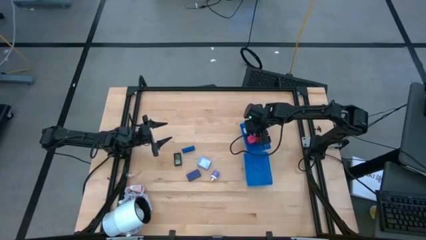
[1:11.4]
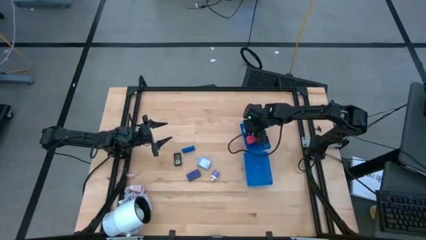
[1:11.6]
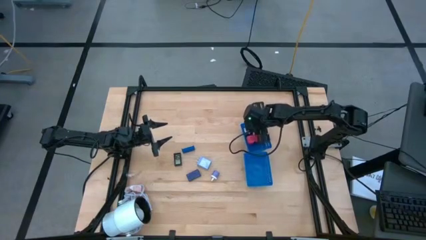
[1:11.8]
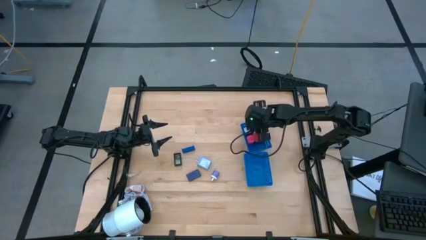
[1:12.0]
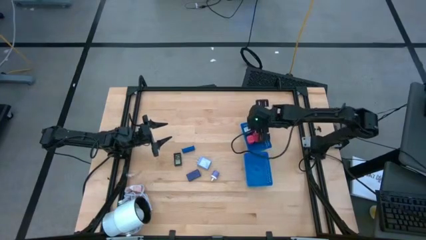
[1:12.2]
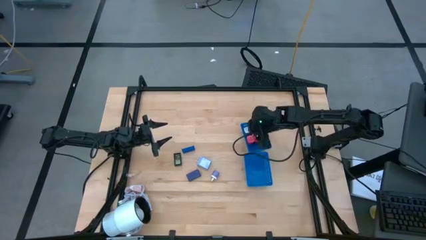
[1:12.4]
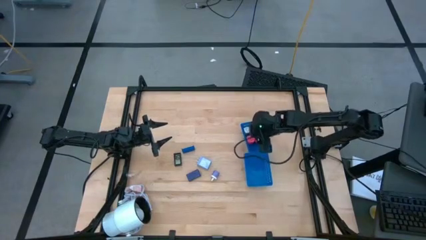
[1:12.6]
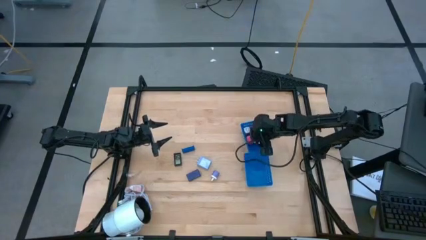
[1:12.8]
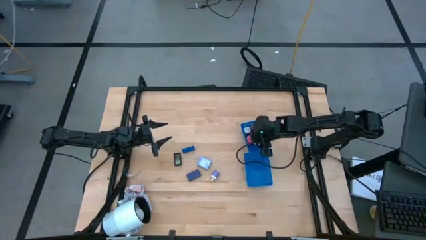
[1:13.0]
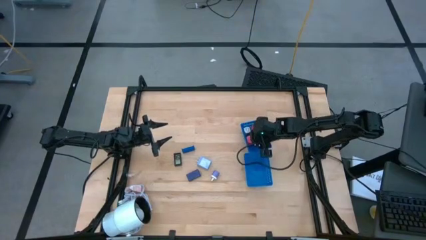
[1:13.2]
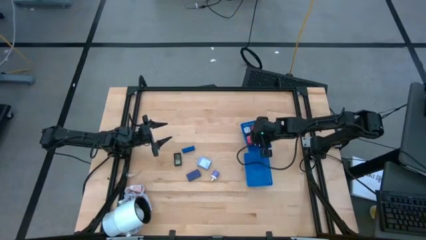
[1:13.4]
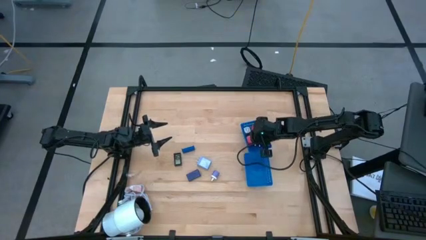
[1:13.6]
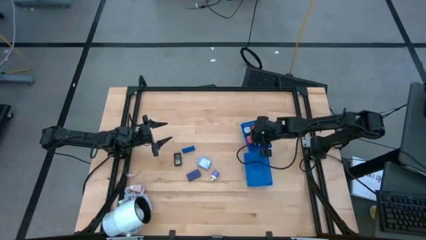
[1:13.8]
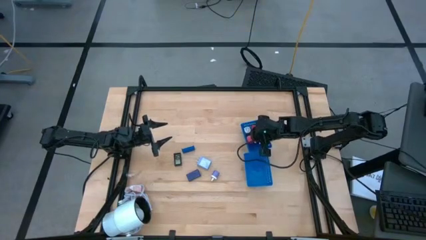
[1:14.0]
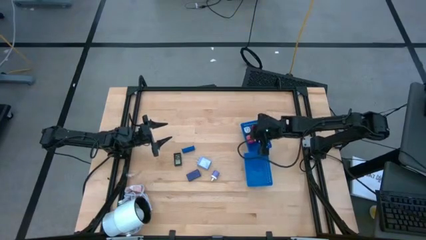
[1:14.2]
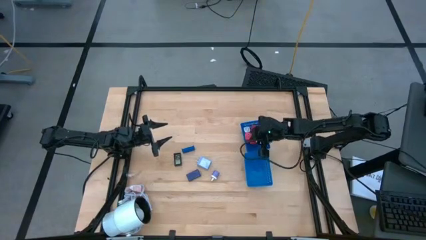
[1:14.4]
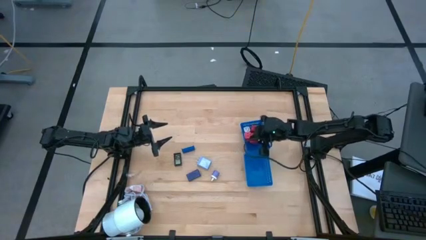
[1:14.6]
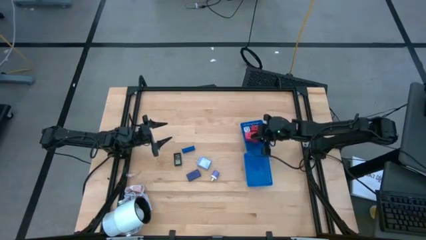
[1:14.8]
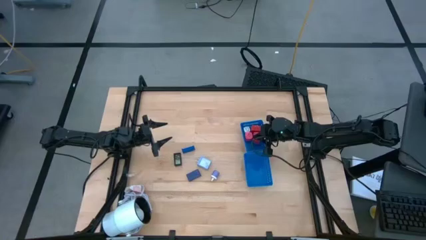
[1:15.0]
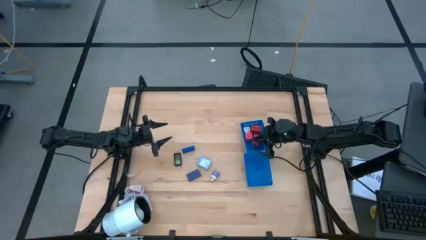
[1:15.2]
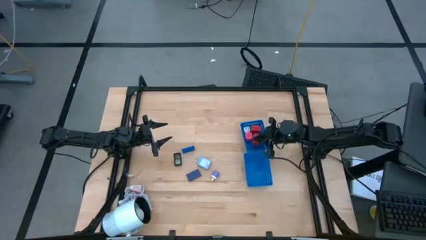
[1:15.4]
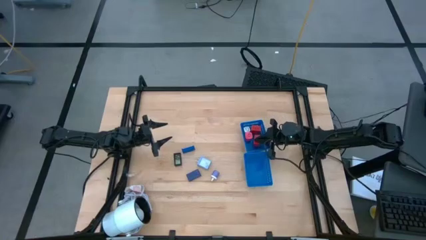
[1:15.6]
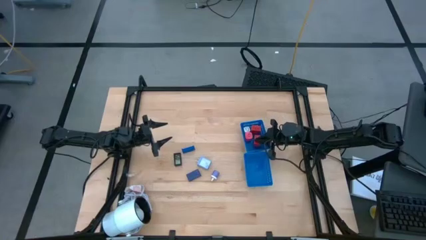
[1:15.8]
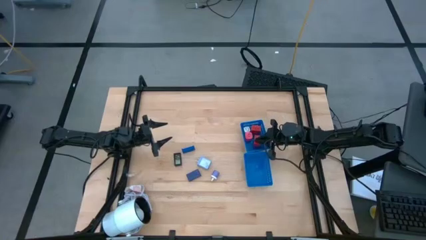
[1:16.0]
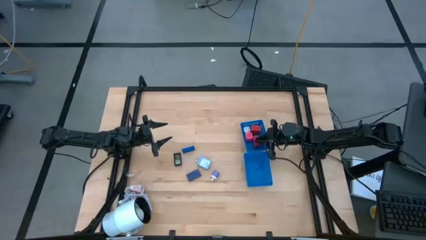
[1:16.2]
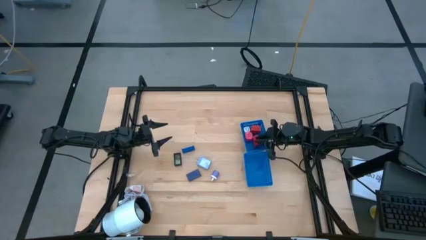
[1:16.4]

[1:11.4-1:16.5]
Task: Pick & Place Office items
Adjust the red charger adapter in the top blue bin

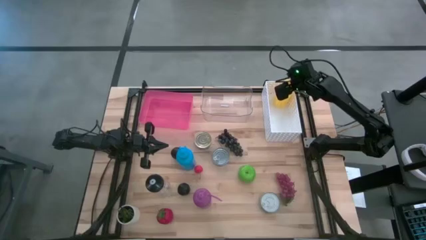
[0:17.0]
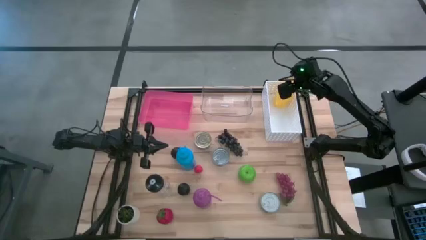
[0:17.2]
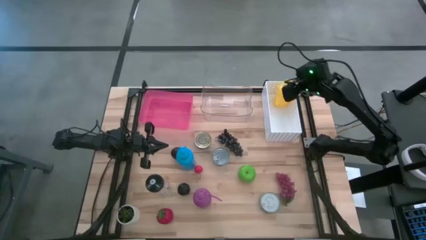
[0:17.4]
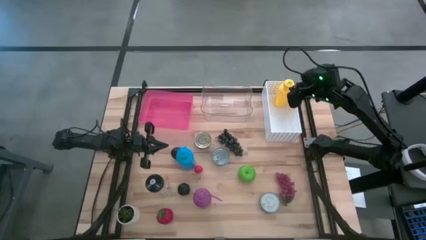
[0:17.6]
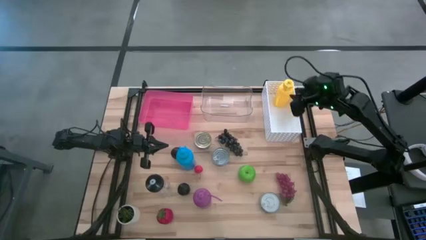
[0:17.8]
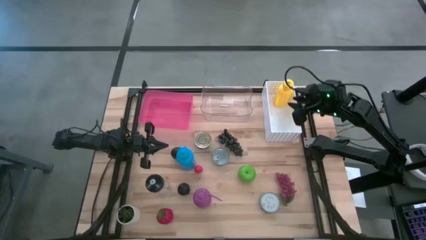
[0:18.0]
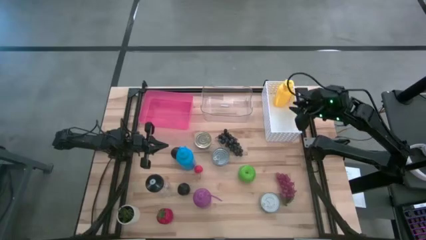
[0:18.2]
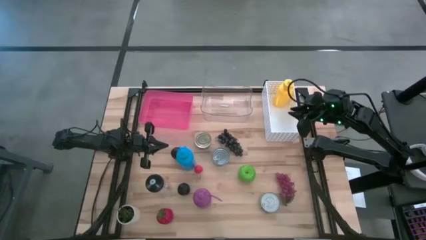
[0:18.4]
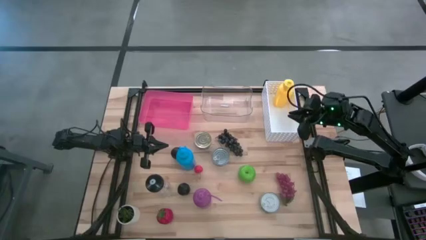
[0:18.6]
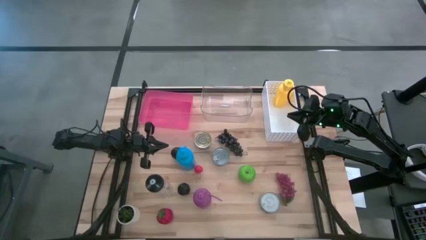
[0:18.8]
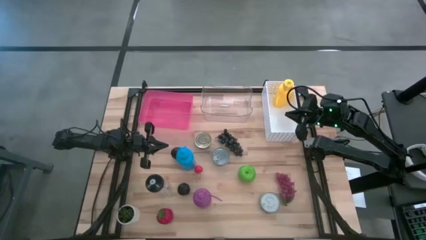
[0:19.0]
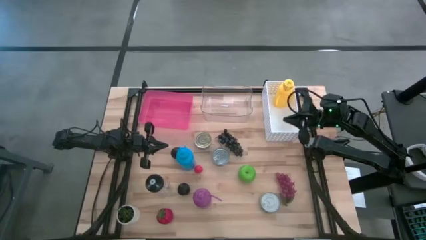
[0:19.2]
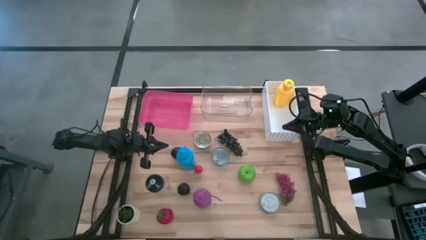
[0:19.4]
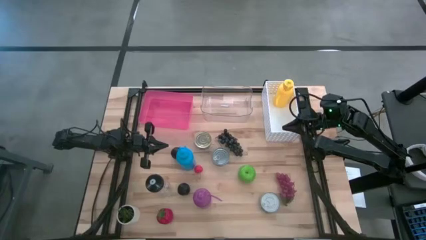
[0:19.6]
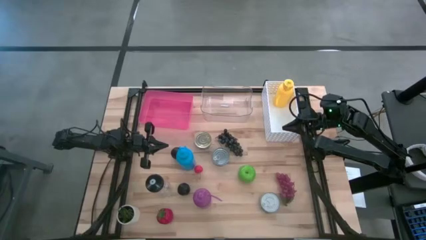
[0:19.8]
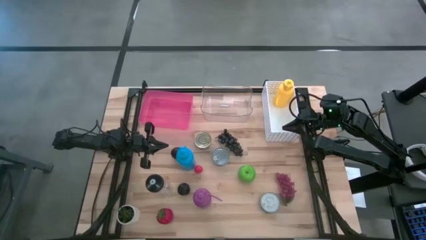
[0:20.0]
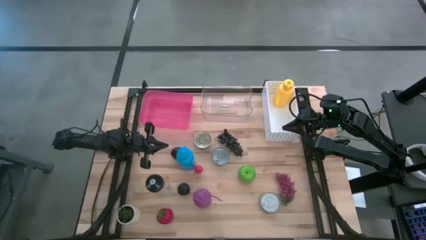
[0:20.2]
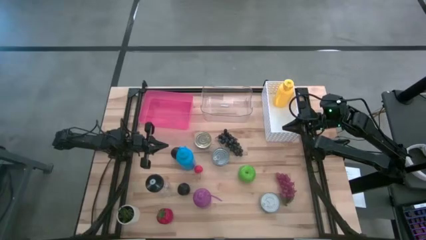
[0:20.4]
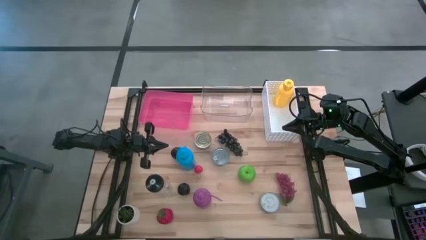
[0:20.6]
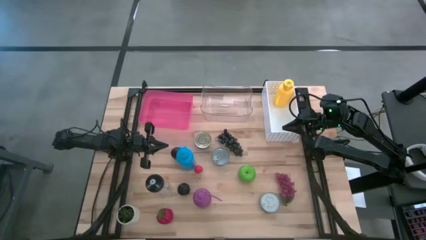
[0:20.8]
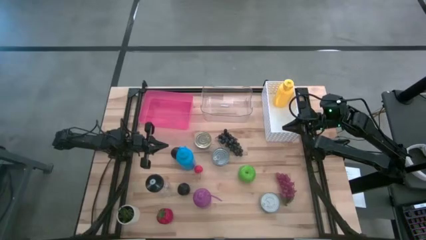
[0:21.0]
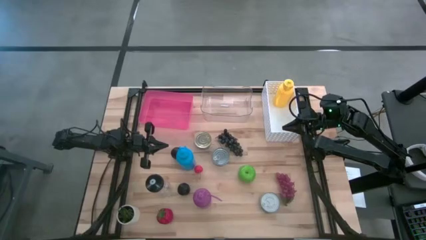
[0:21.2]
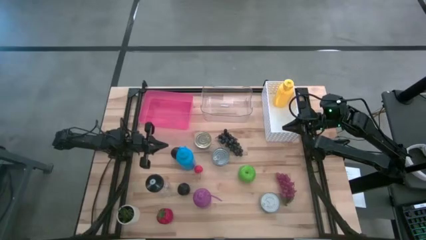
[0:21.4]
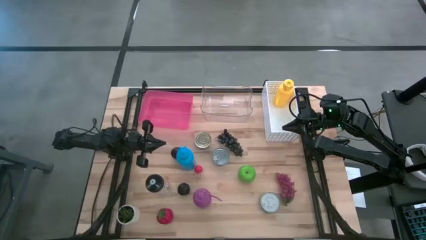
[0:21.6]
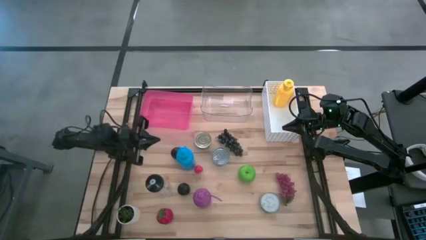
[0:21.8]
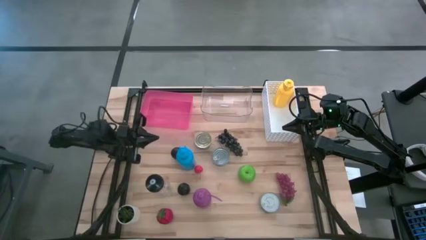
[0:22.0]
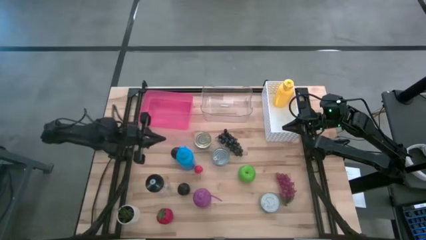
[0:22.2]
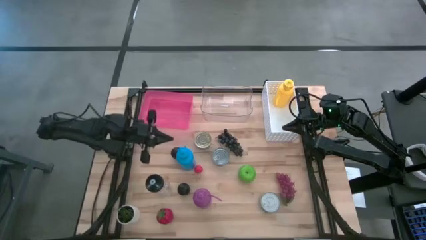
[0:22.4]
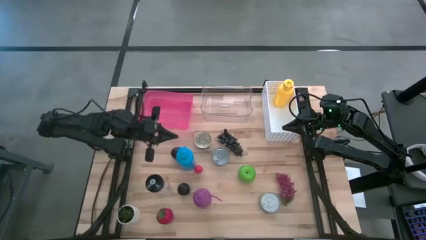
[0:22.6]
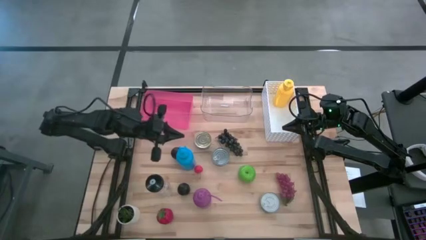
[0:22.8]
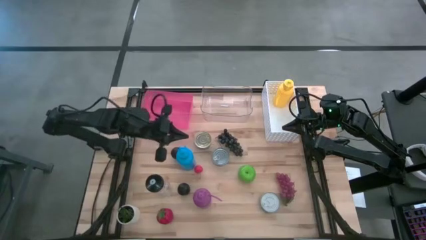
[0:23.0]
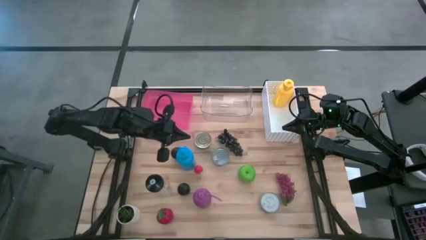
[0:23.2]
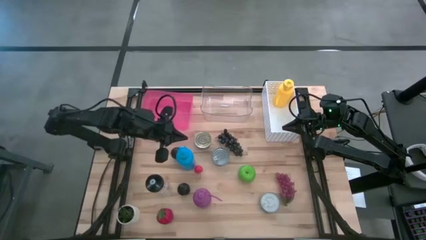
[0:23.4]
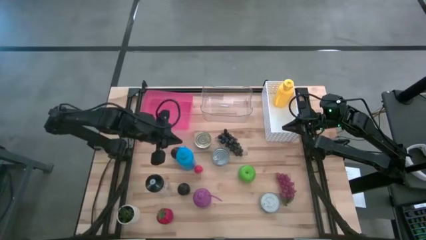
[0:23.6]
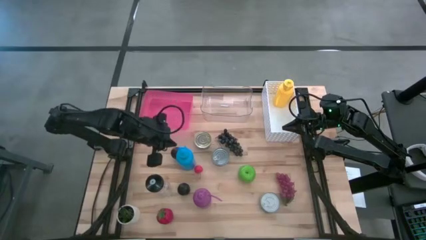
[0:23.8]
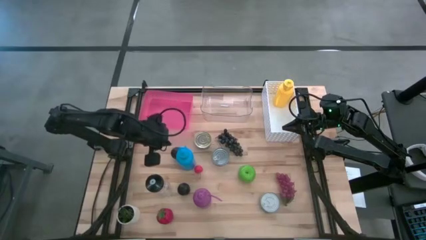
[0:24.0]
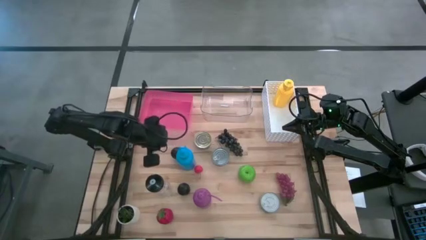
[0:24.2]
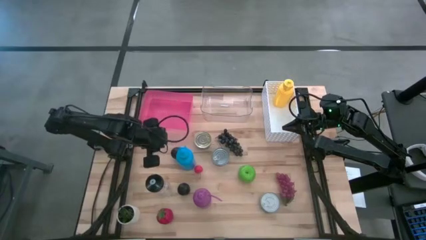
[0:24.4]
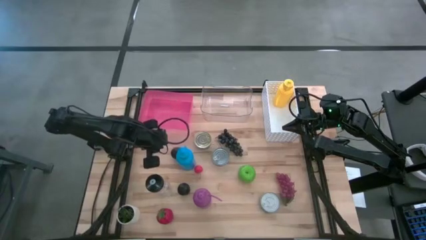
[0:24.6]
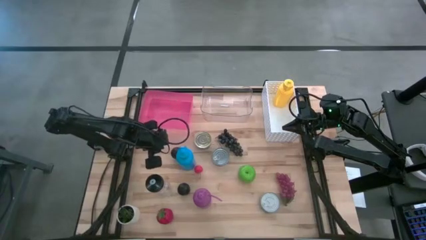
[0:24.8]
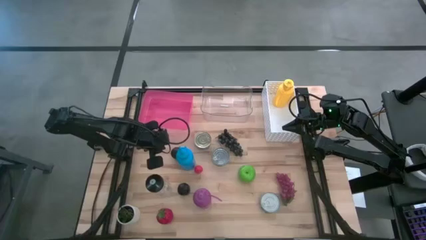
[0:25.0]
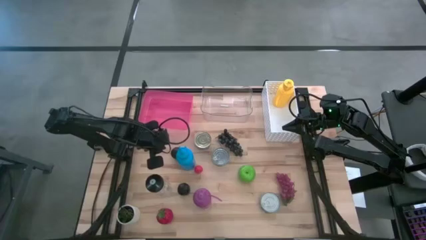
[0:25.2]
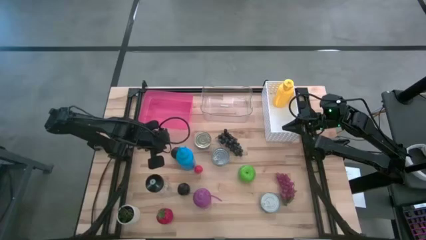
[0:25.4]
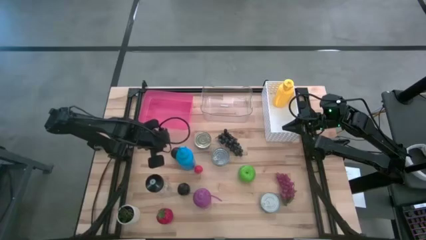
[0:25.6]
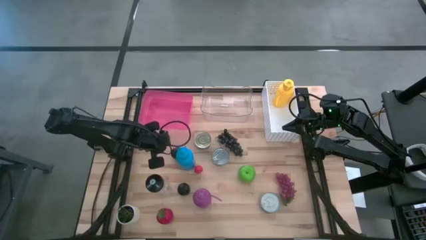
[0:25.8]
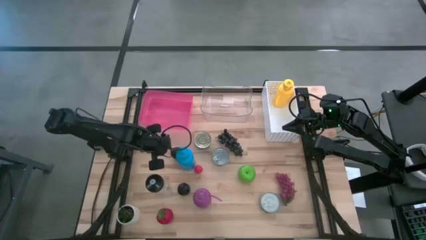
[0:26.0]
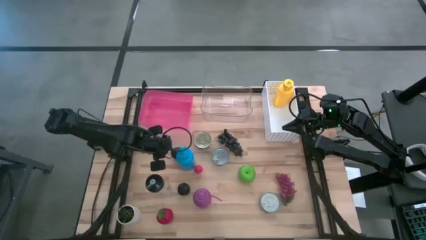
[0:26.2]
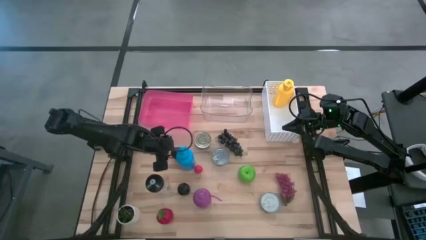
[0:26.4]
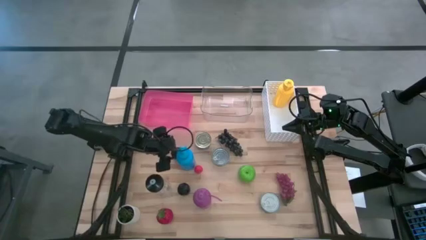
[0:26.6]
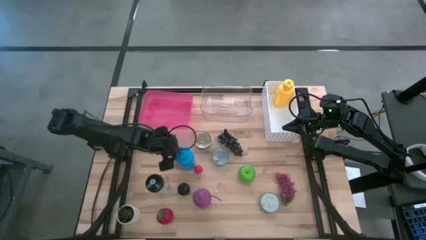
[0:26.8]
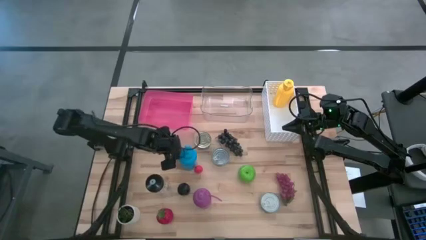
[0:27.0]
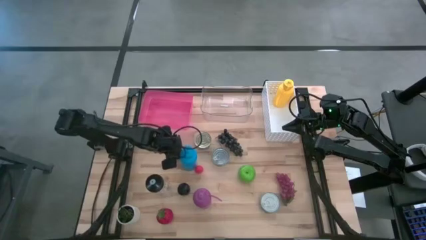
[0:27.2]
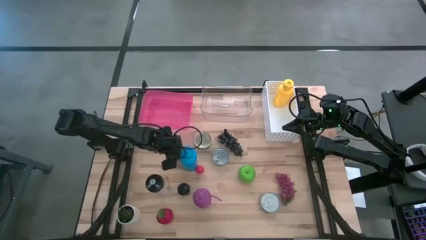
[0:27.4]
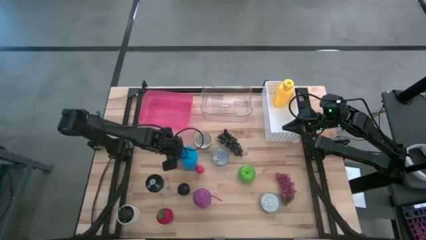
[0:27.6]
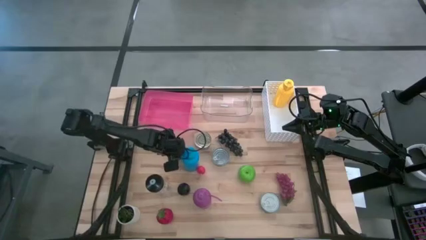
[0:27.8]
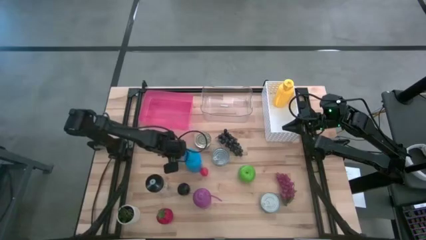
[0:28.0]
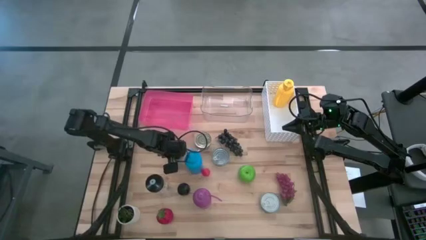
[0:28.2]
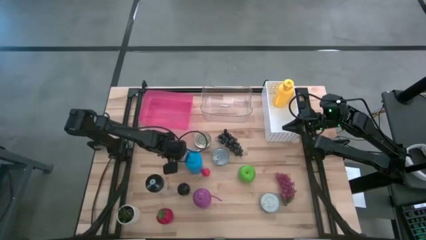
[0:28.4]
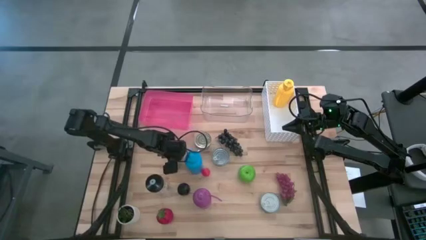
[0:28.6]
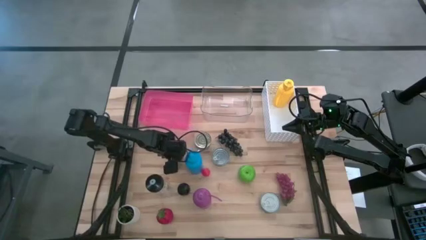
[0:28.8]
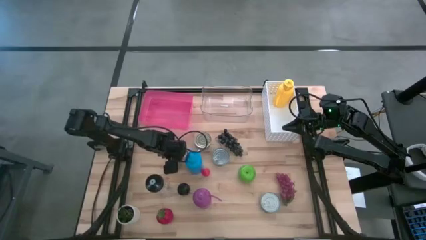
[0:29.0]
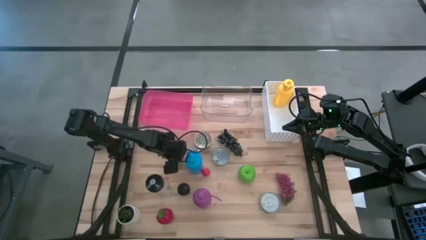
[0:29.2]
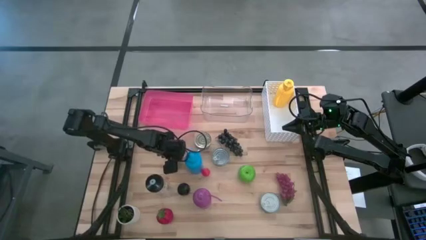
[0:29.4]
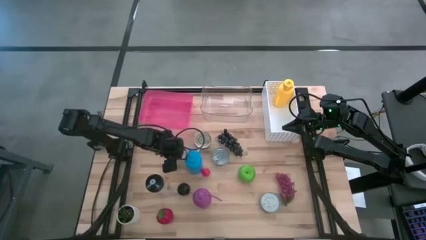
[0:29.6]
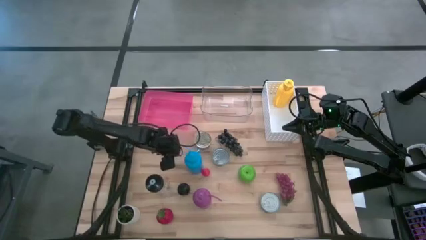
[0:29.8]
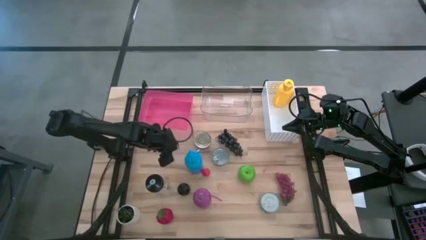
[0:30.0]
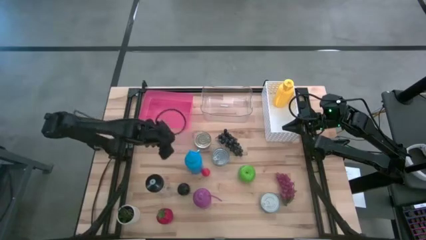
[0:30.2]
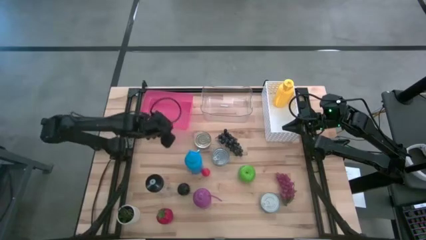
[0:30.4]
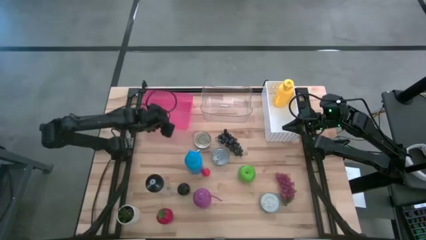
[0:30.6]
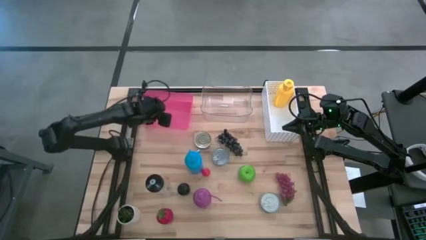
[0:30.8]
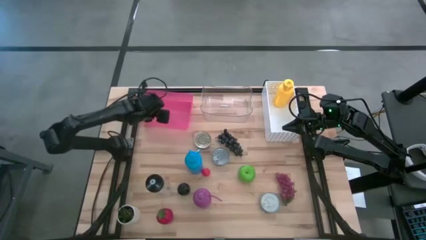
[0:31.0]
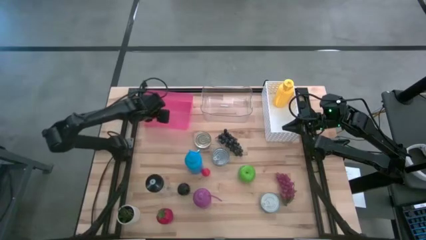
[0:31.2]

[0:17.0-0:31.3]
Task: Pick & Place Food Item
Put the top plum into the pink bin
